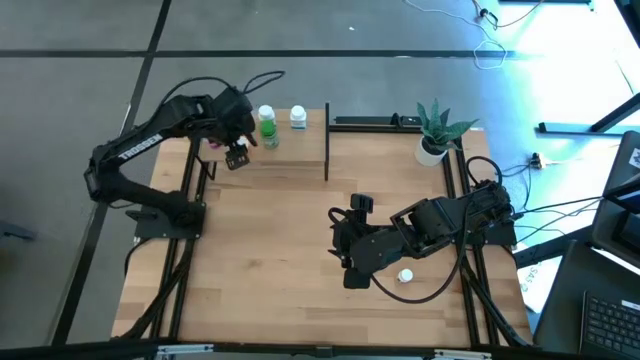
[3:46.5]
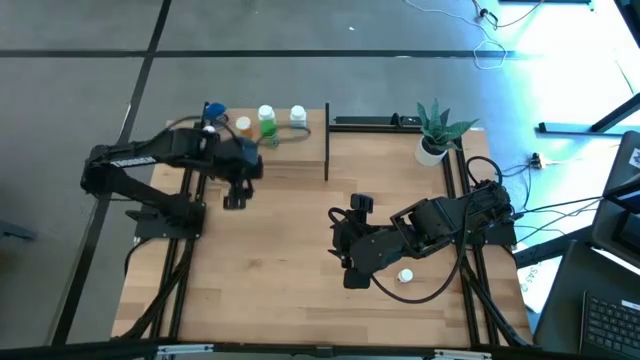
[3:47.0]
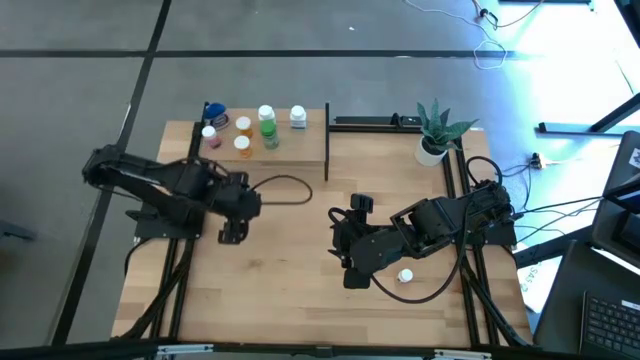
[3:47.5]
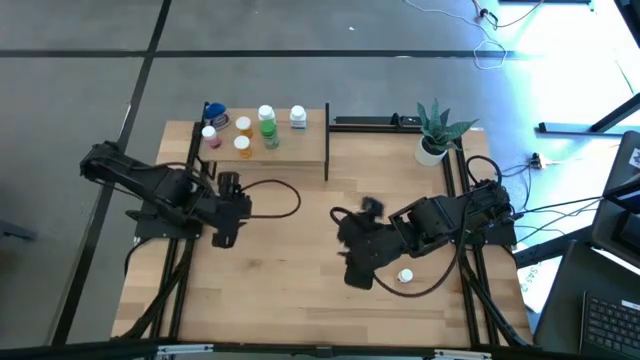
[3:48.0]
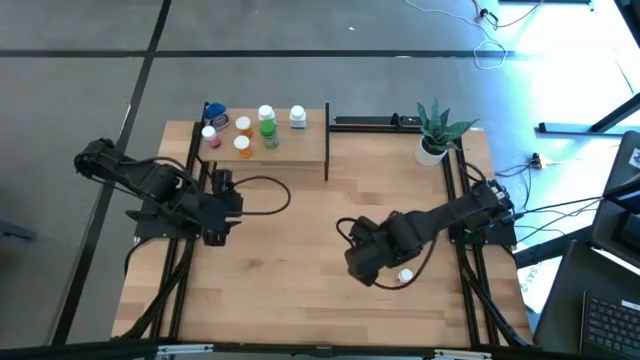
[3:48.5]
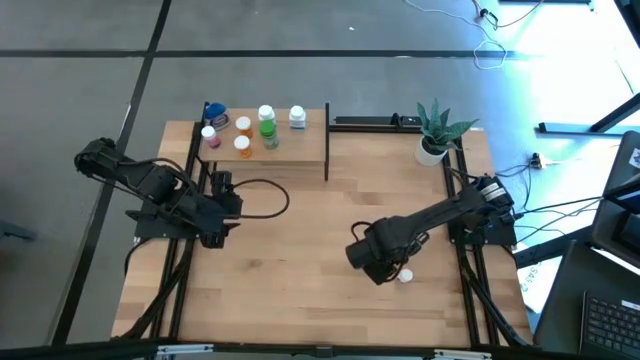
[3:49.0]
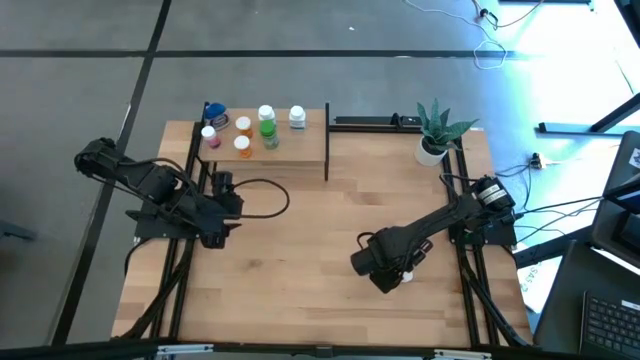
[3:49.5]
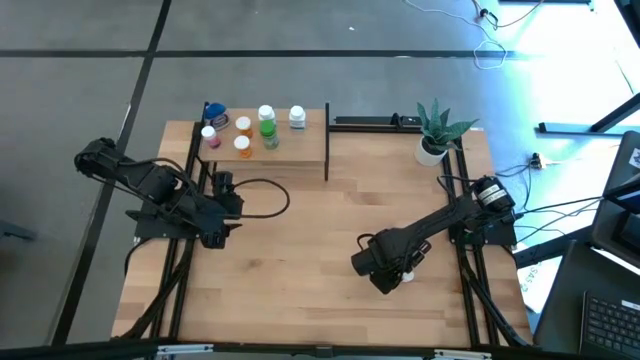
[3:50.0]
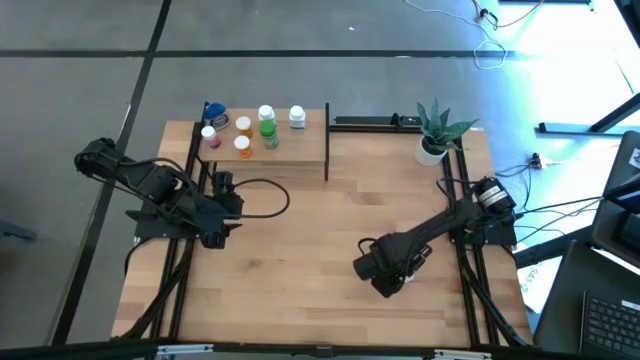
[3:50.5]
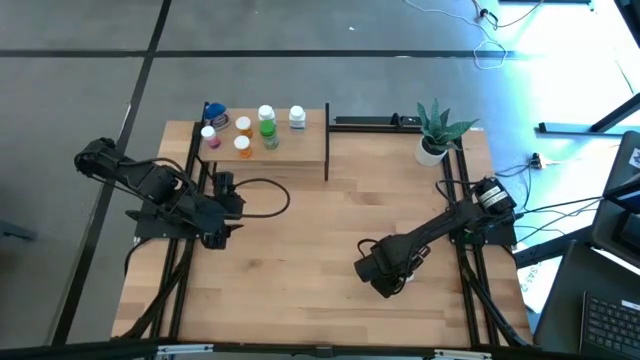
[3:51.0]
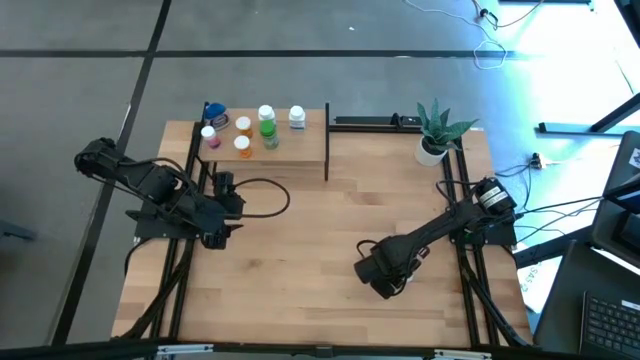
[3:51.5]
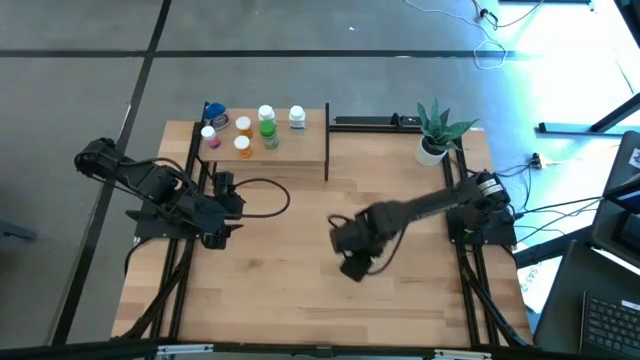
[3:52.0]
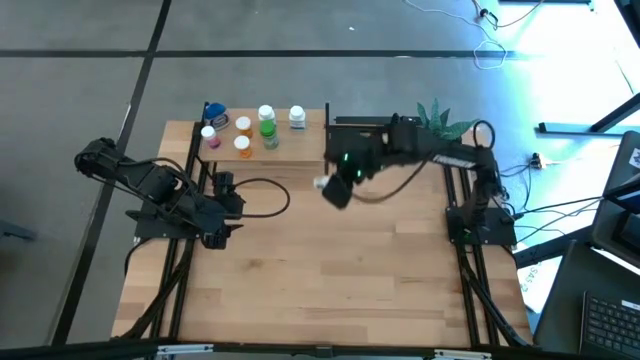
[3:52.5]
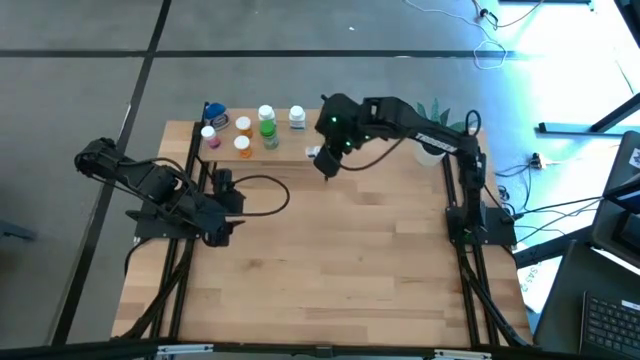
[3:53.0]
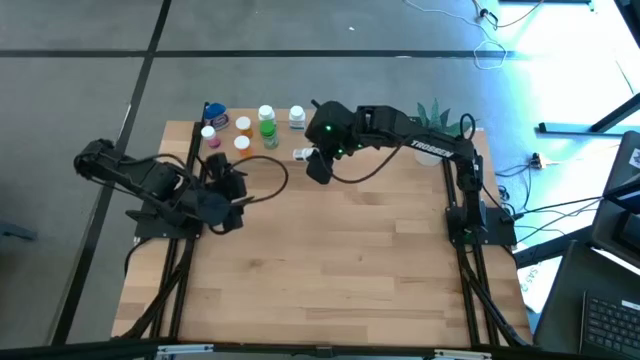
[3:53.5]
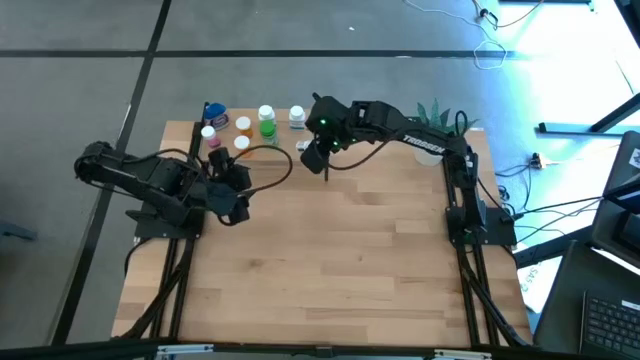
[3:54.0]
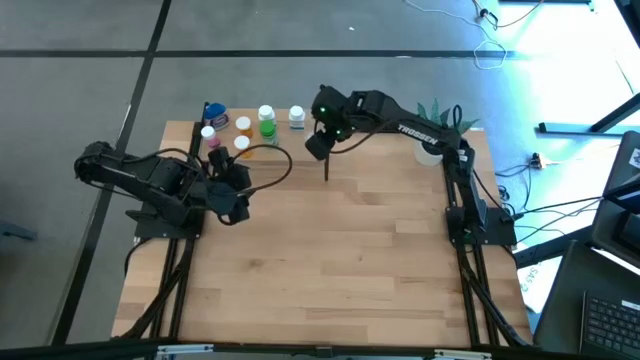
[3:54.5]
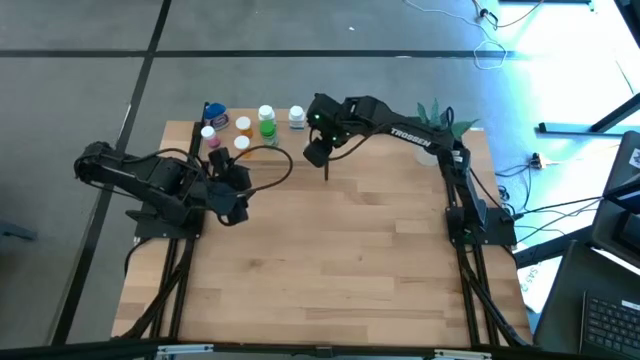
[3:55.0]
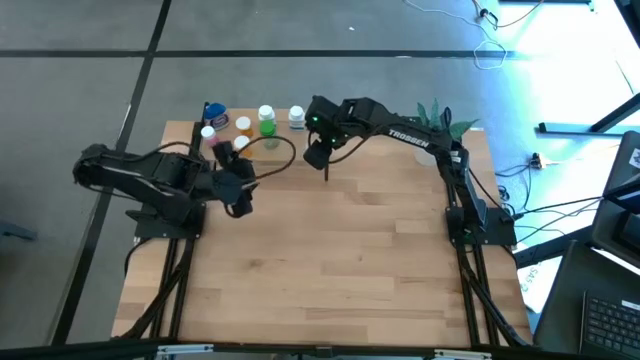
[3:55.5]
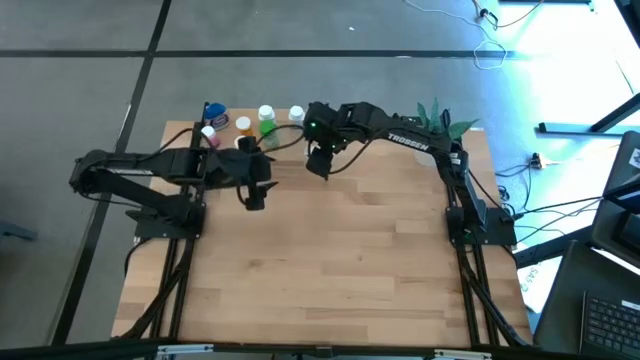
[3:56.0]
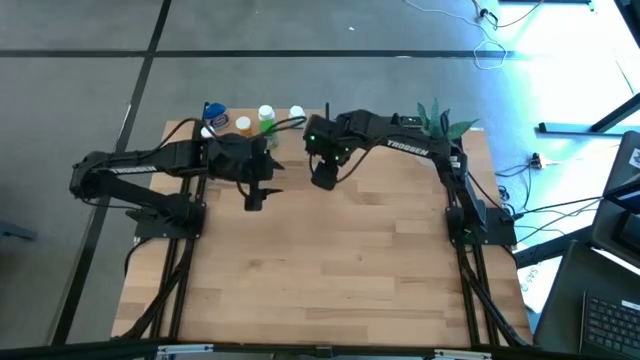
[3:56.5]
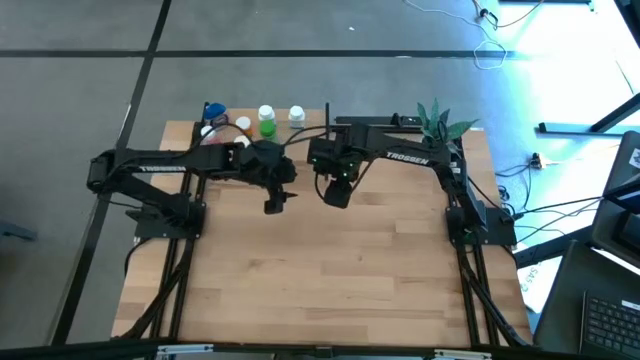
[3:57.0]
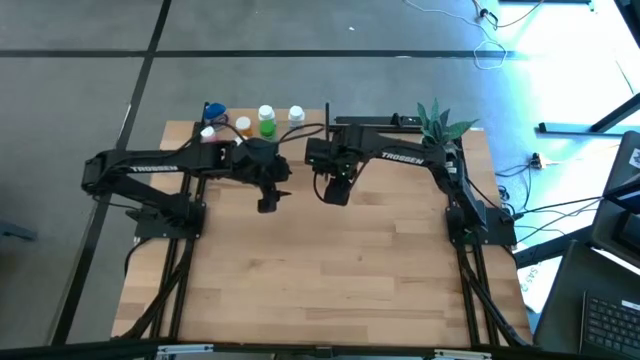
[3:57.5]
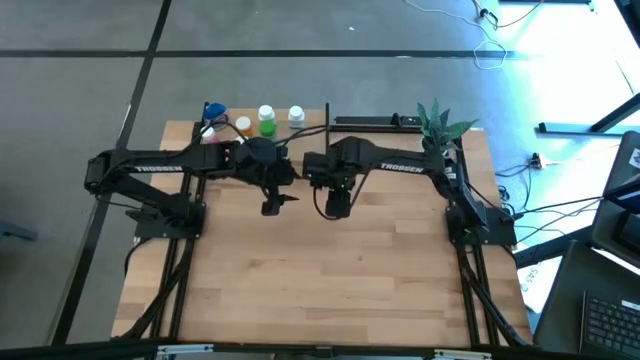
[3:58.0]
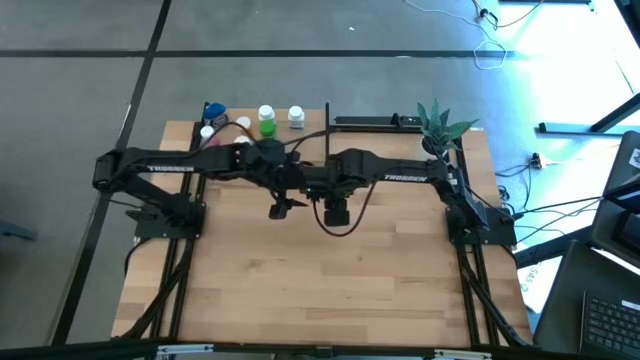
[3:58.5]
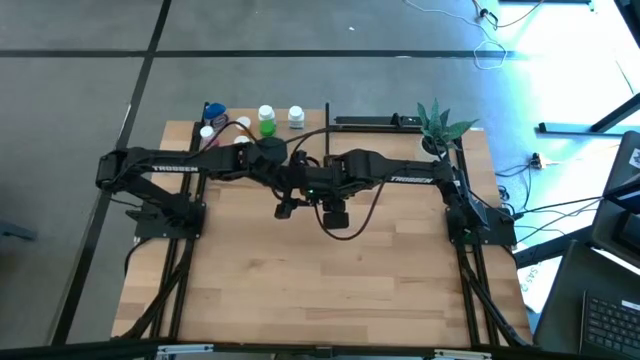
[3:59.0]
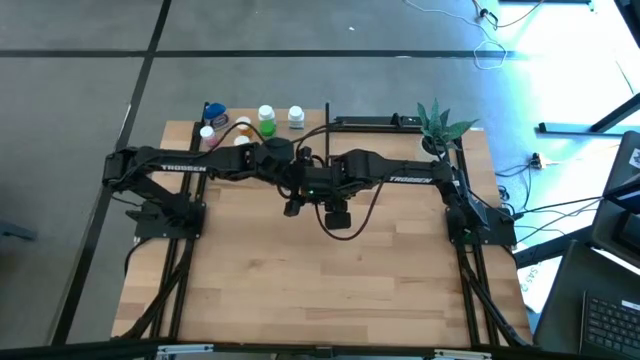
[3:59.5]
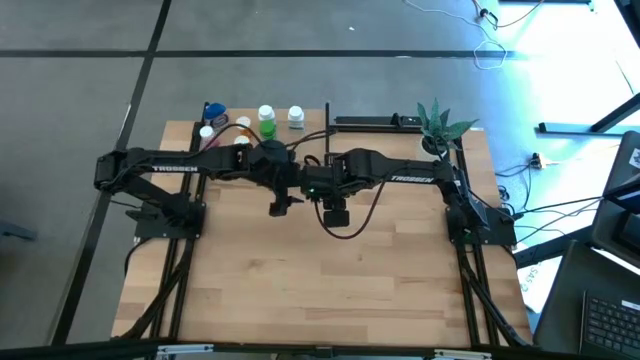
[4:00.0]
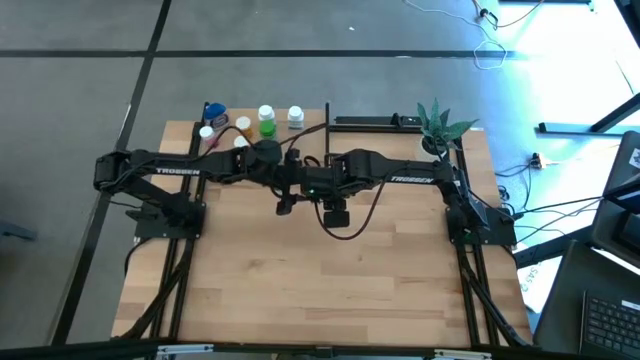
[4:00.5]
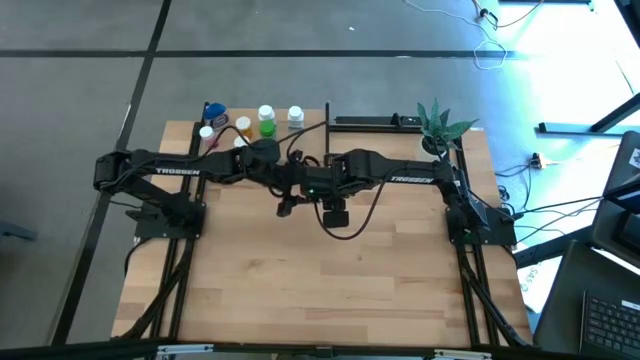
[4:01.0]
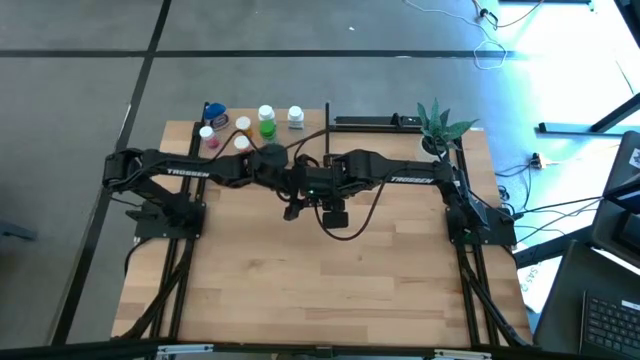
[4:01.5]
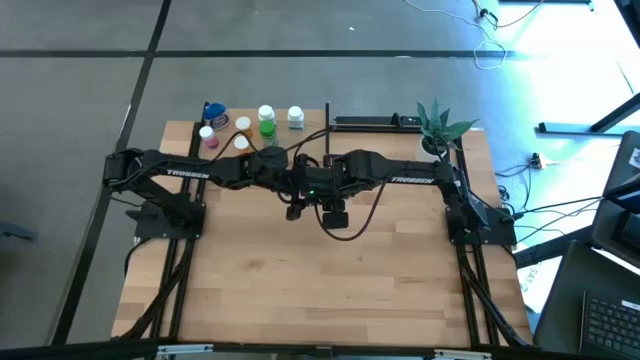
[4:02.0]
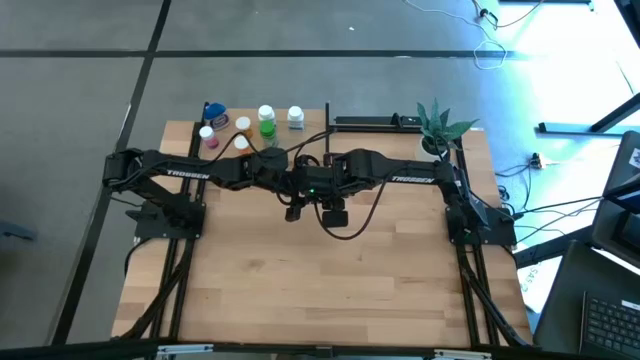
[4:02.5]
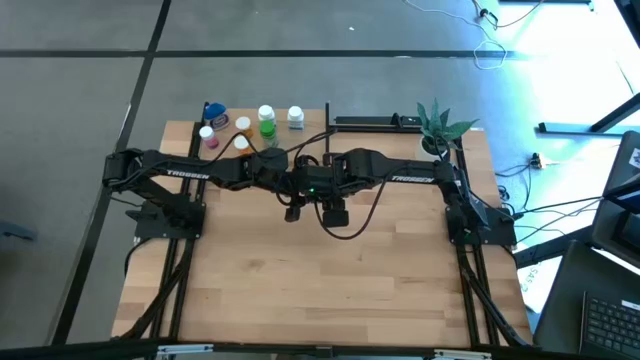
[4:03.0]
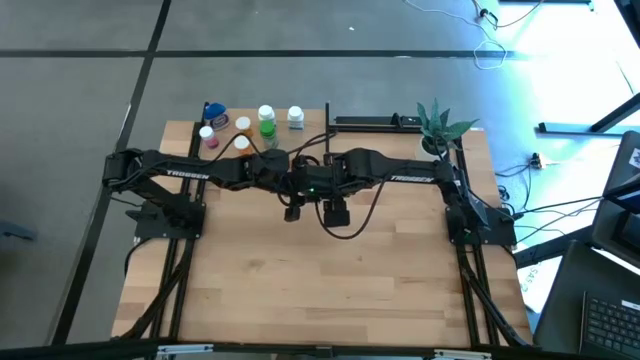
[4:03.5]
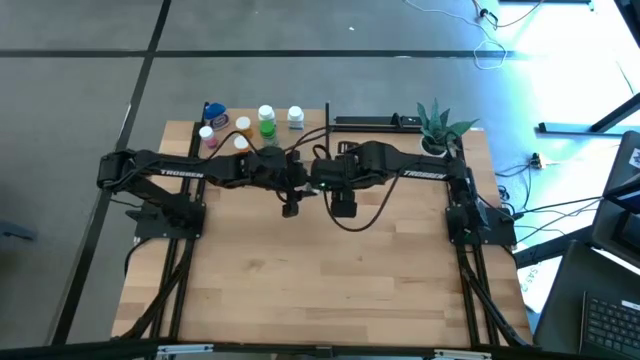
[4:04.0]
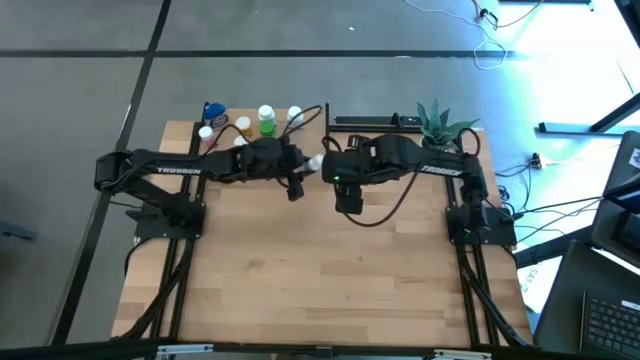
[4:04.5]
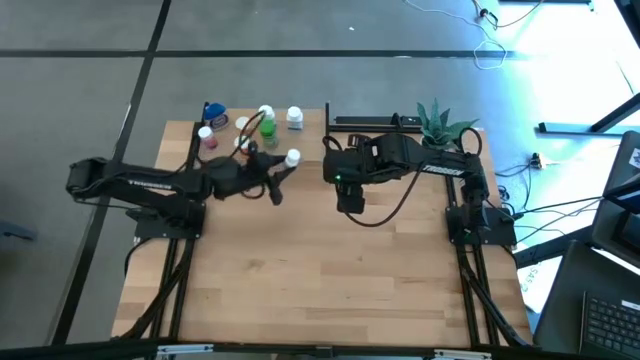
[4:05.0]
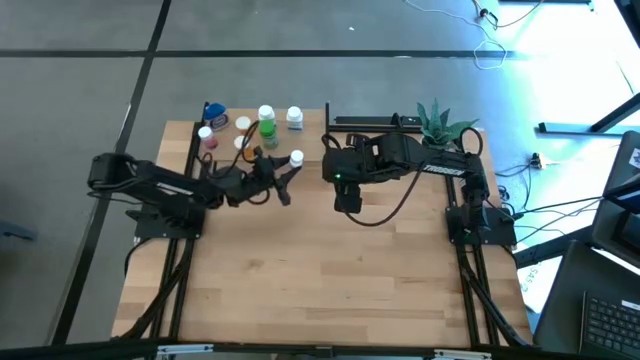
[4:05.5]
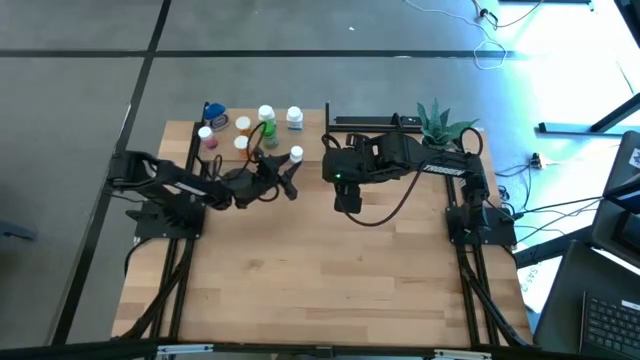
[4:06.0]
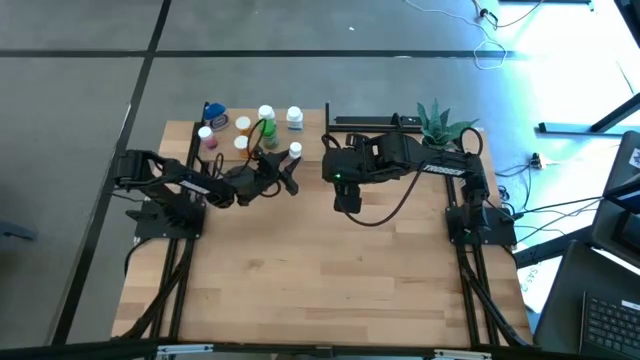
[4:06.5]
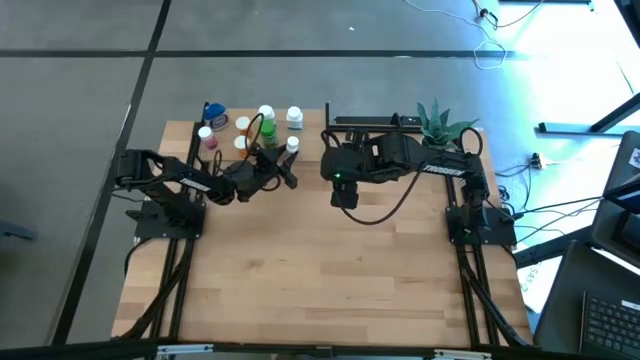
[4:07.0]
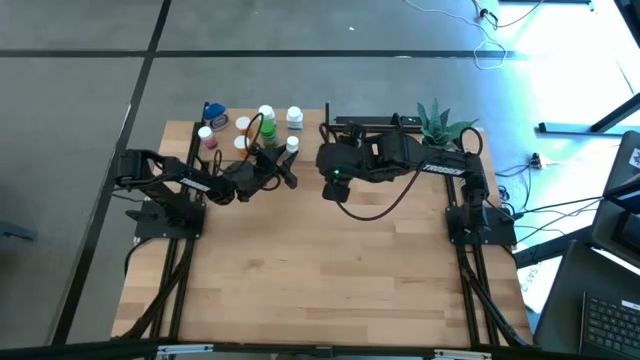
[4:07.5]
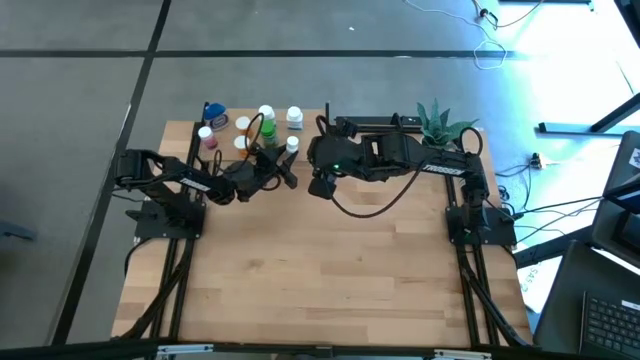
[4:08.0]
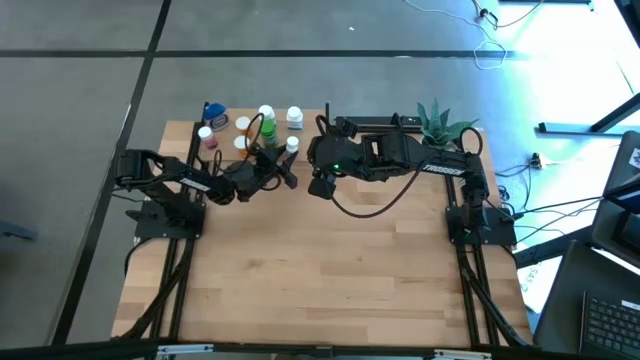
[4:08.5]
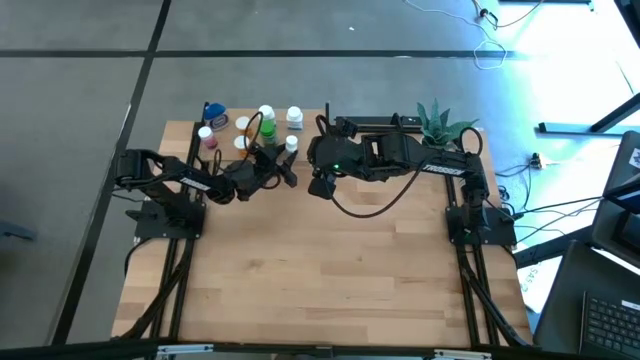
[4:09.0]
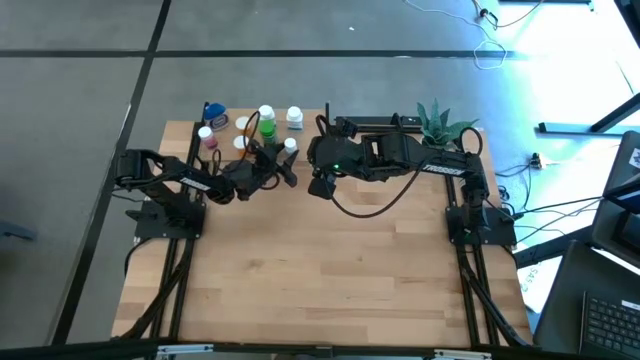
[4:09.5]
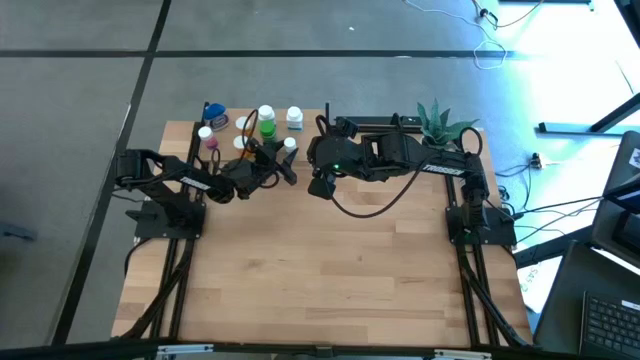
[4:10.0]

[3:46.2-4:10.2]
Task: Pick and place medicine bottles onto shelf by color
Put the white and black pill bottle on the shelf
